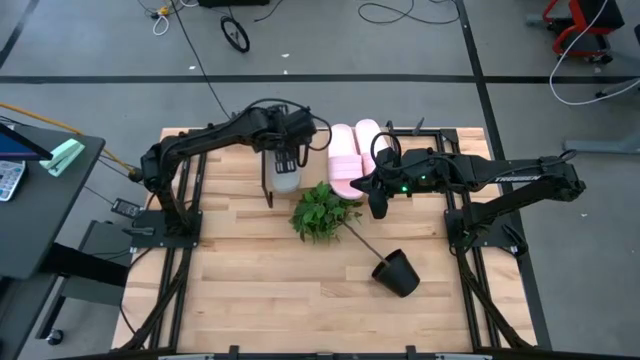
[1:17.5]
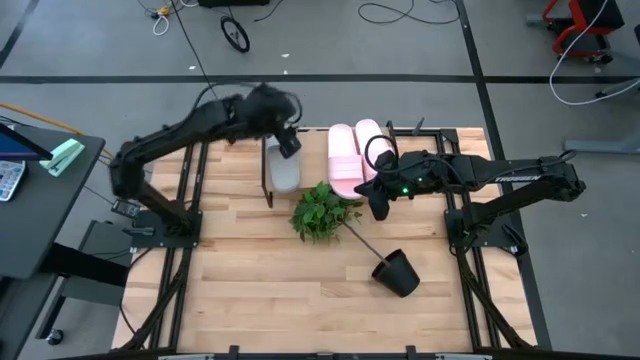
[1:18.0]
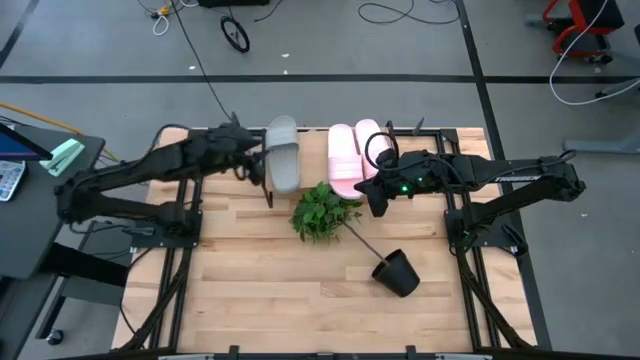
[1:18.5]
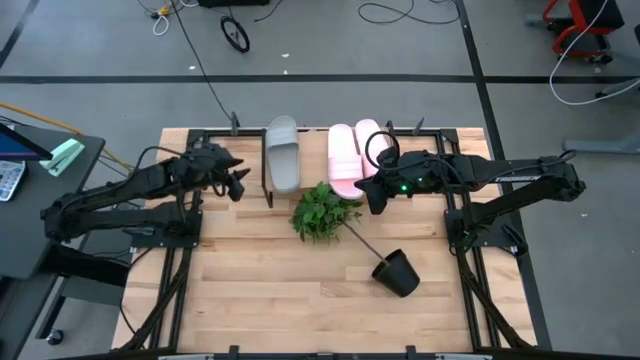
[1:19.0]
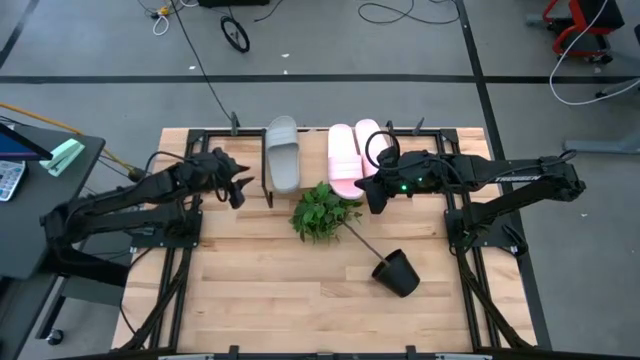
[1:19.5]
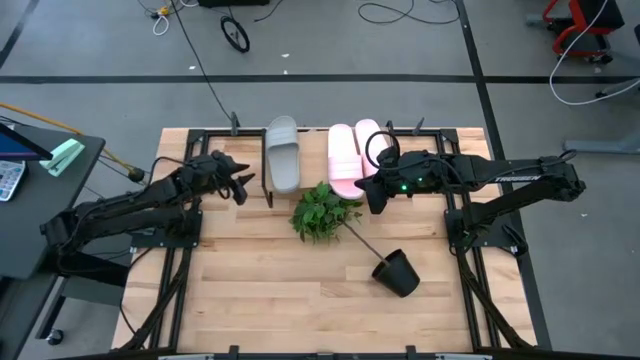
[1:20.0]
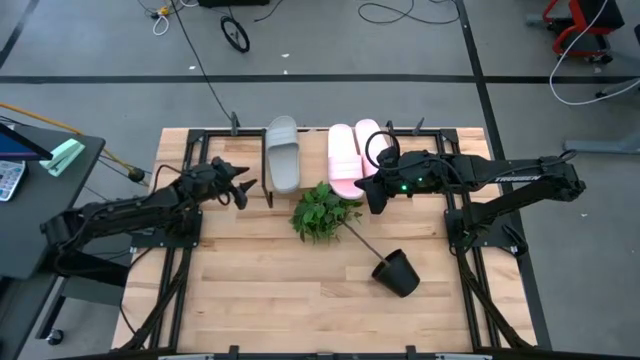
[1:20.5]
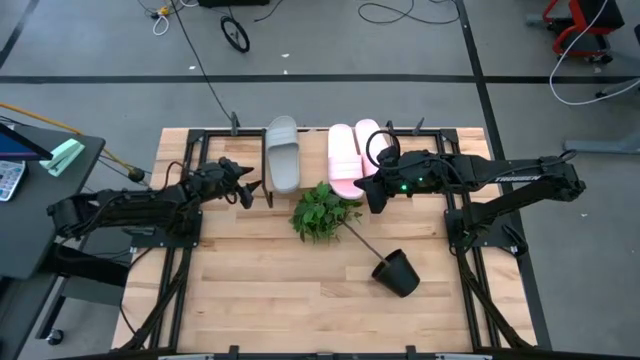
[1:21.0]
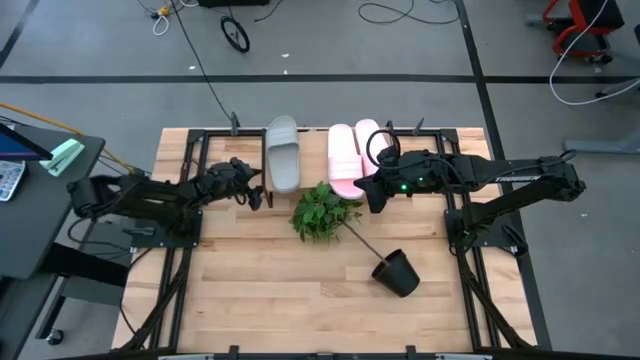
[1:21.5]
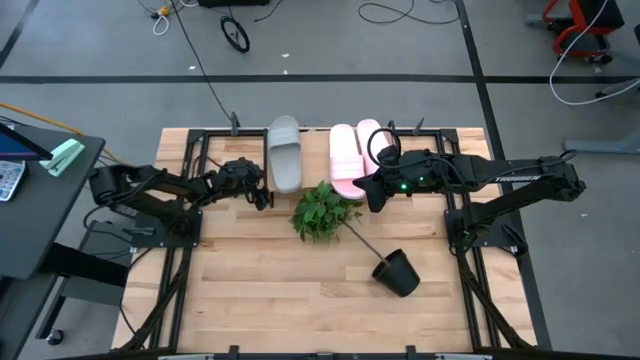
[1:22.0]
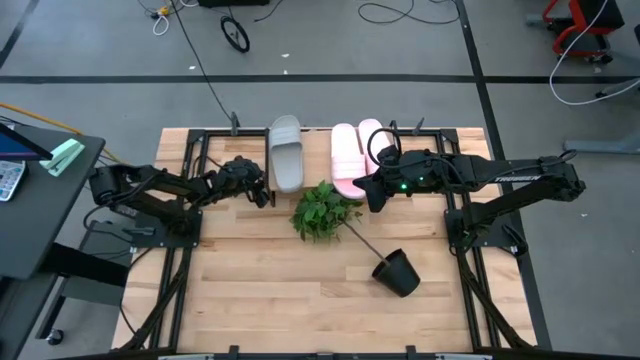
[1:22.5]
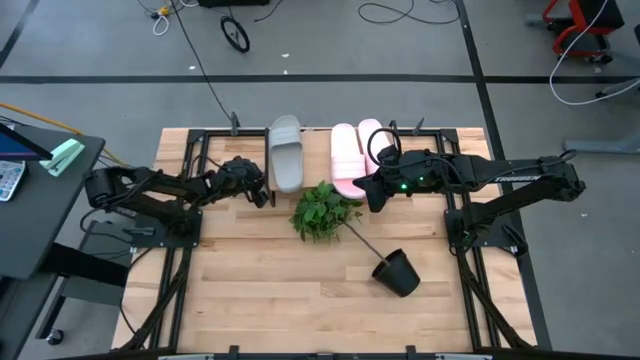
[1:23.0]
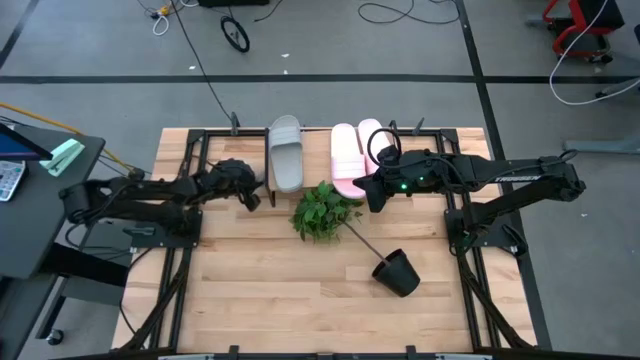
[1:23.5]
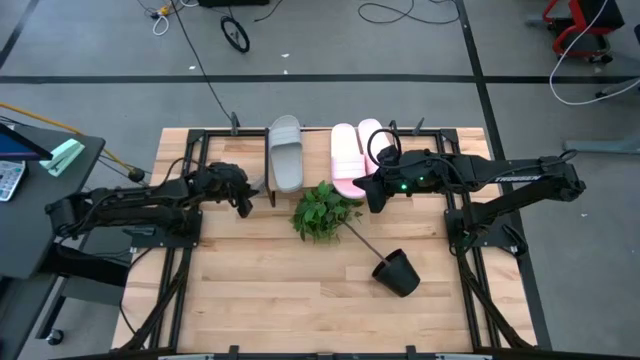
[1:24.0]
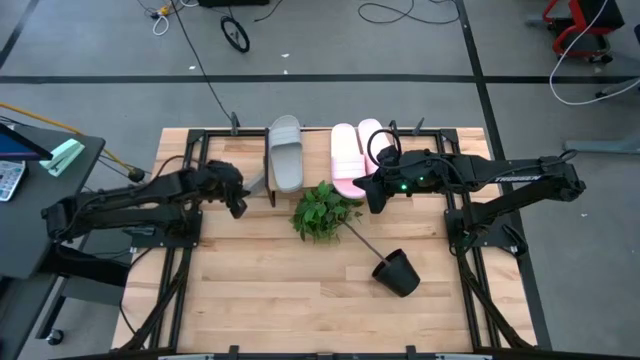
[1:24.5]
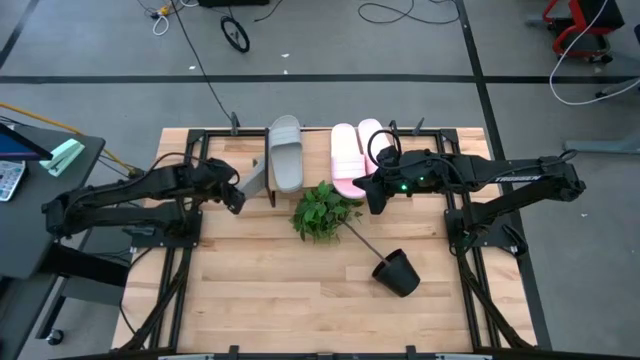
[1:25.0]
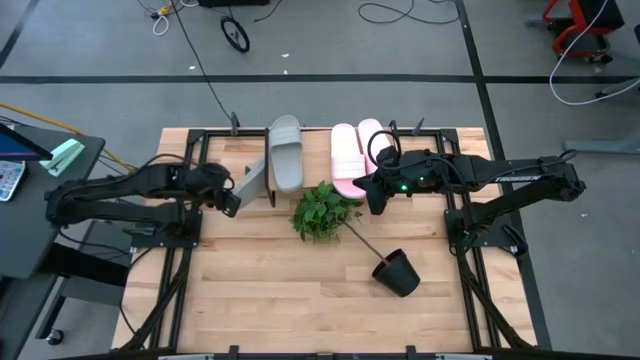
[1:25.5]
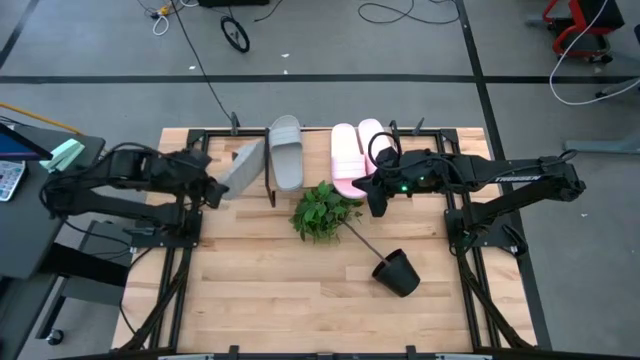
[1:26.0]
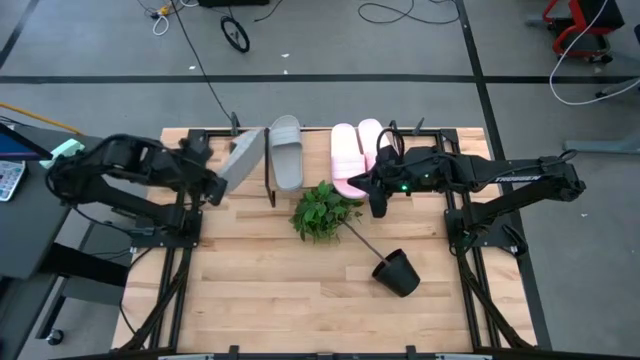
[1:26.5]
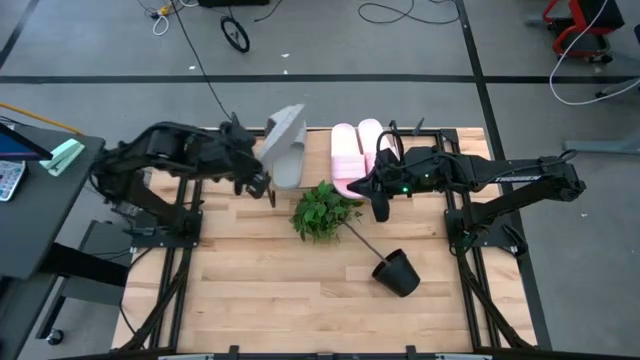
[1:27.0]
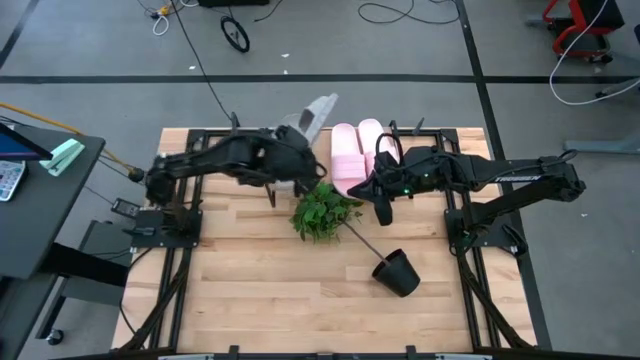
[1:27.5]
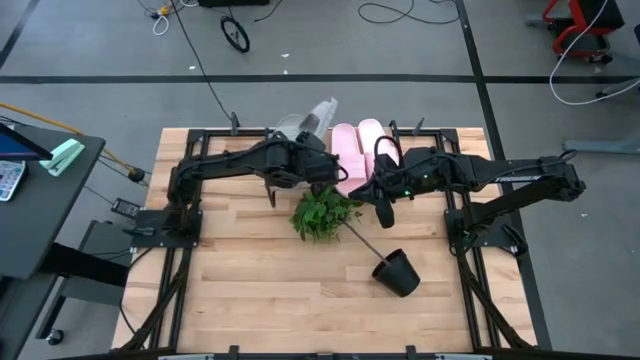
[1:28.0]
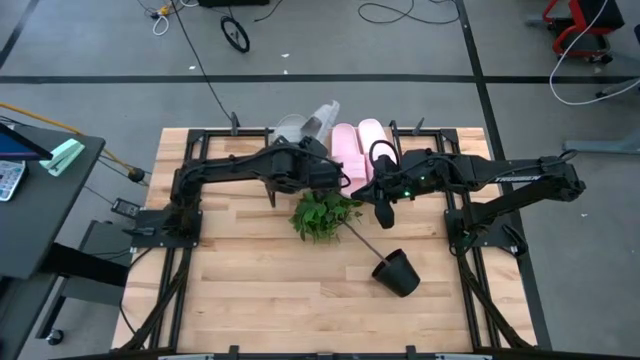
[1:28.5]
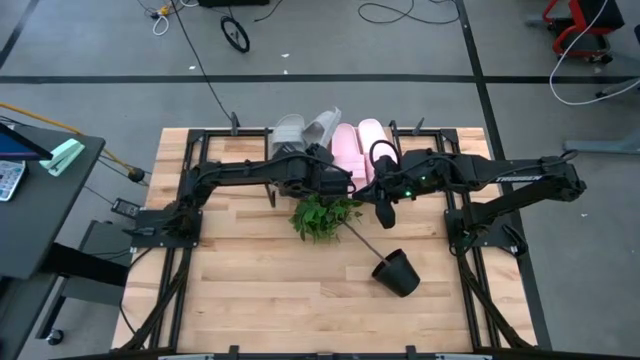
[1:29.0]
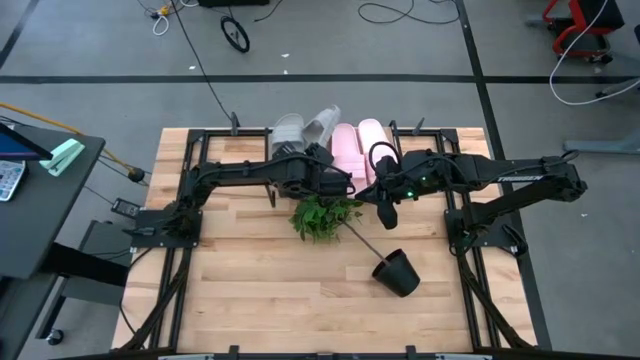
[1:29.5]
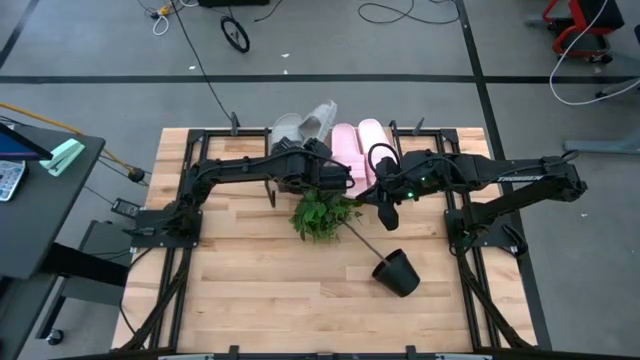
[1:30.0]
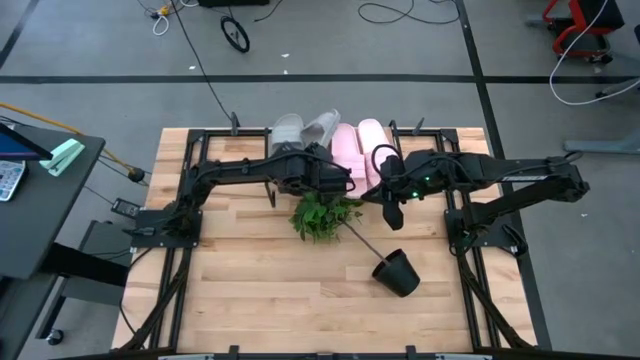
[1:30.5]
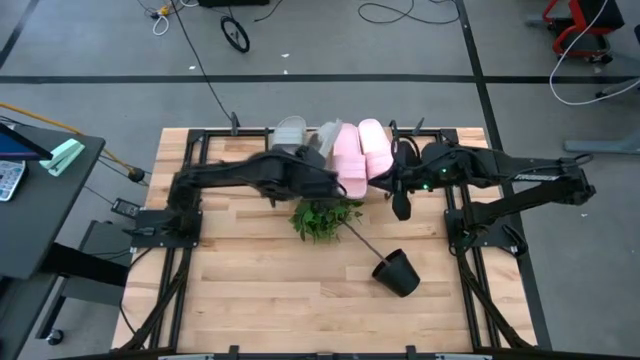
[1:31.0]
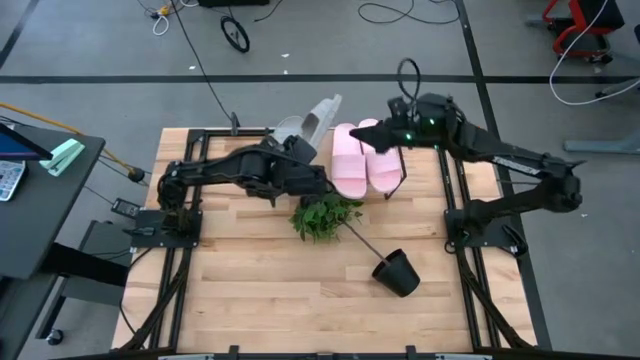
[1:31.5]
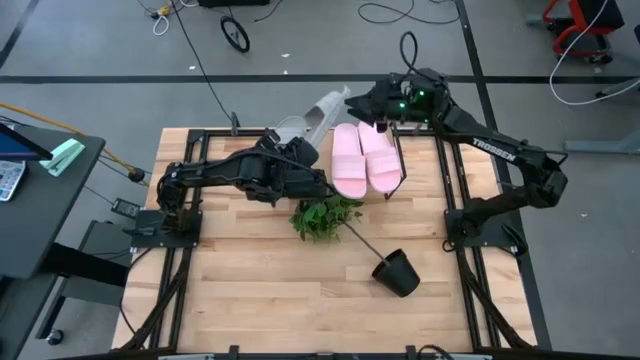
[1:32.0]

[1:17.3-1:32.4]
Task: Pick and place slides into the shelf
Put the gray slides on the shelf

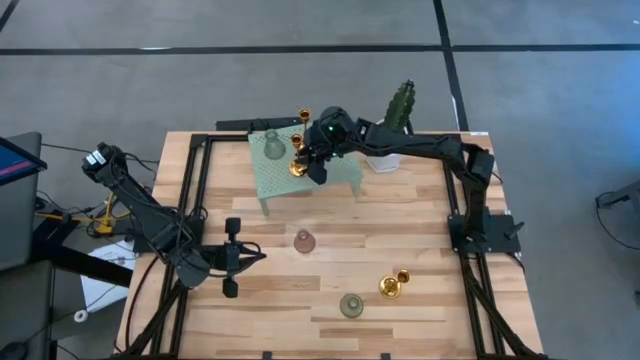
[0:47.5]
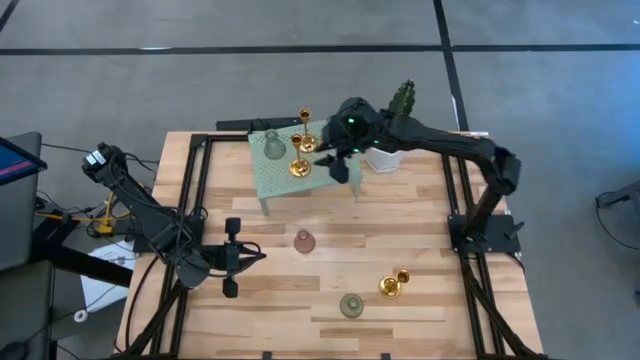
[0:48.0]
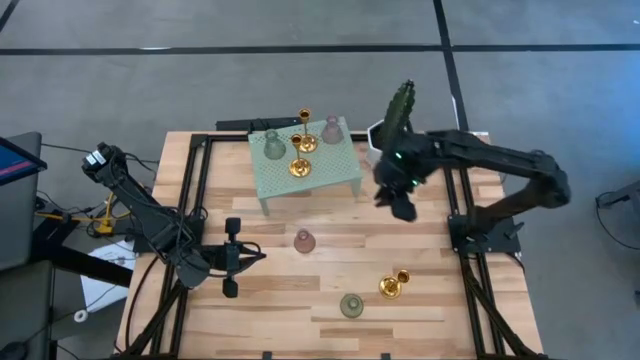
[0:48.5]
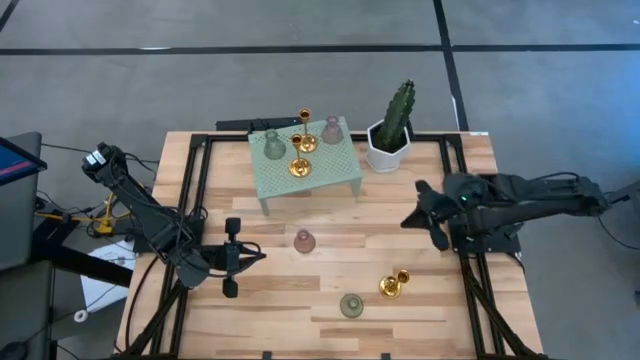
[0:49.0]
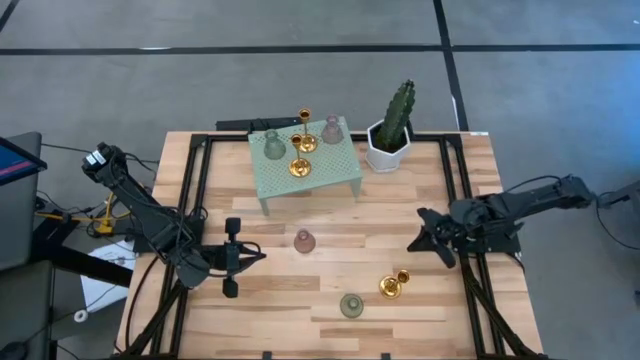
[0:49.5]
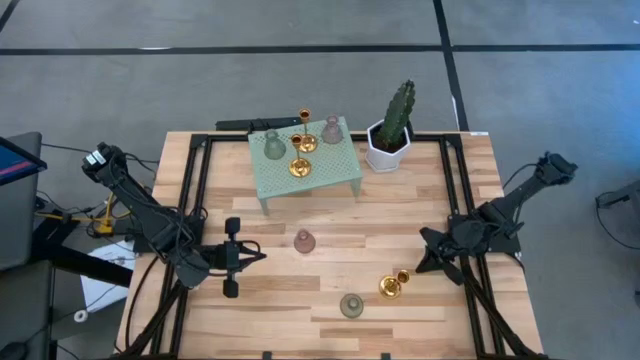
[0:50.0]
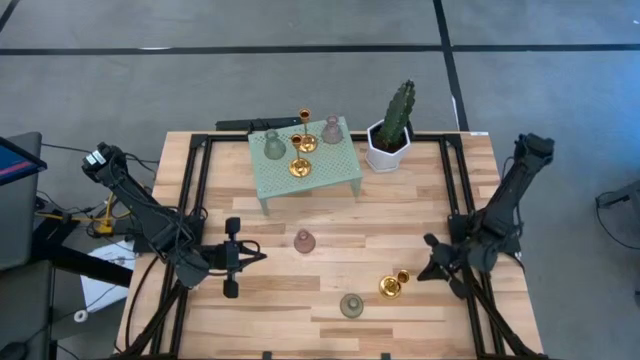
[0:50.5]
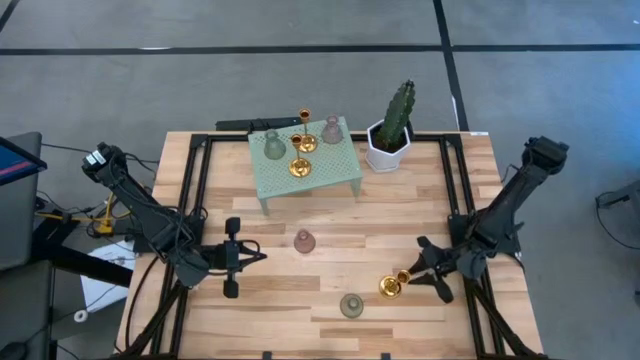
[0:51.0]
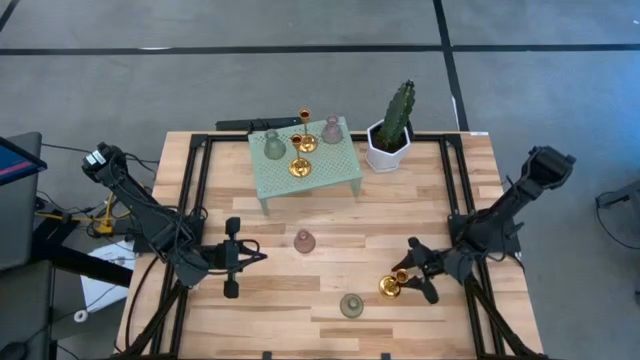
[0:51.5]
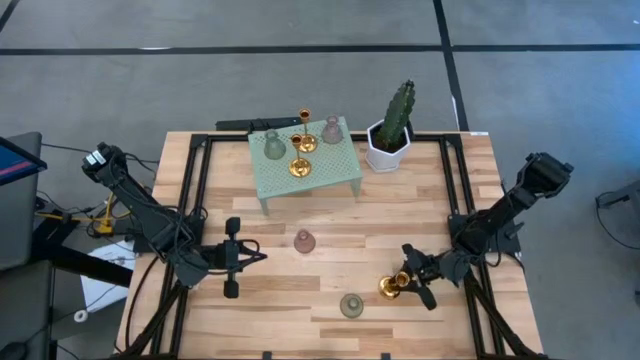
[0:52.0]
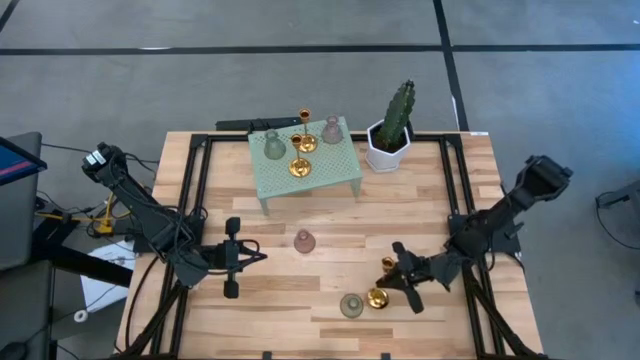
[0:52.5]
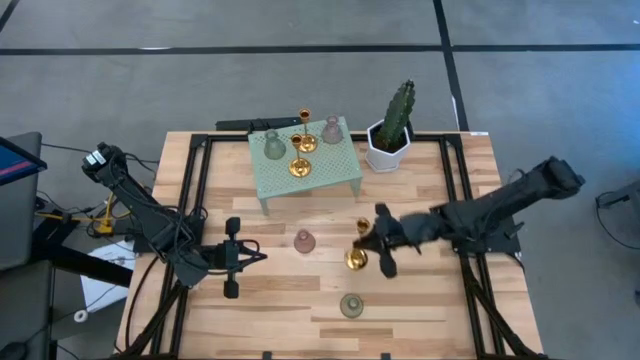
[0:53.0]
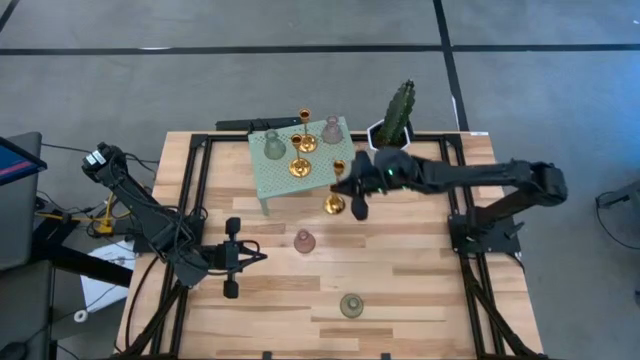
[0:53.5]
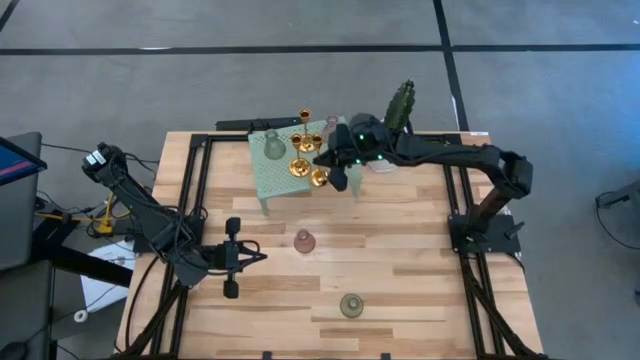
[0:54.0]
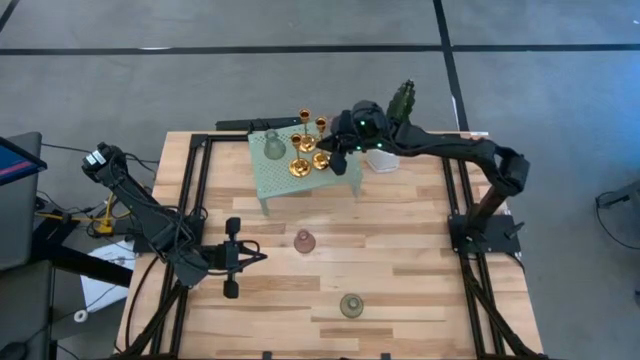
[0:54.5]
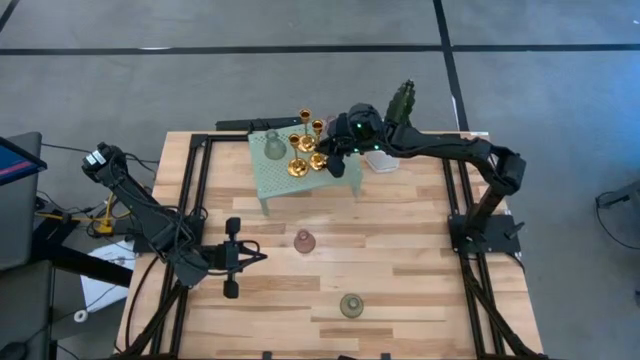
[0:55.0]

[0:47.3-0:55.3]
Task: Pick & Place candle stick holders
Put the golden candle holder on the shelf
